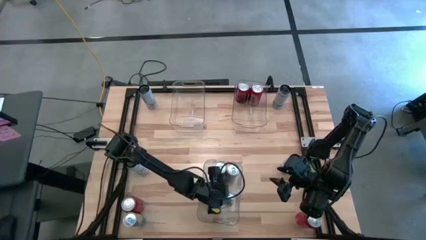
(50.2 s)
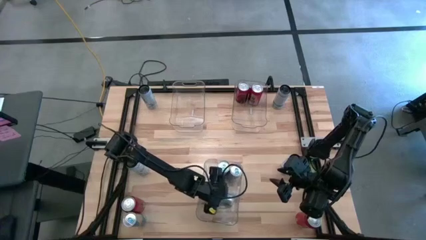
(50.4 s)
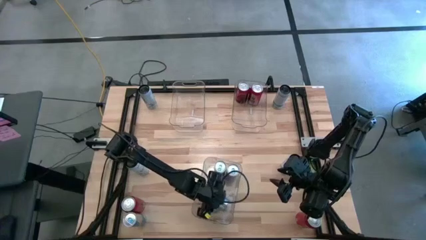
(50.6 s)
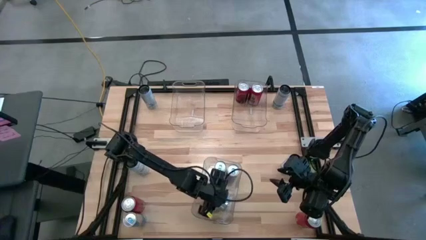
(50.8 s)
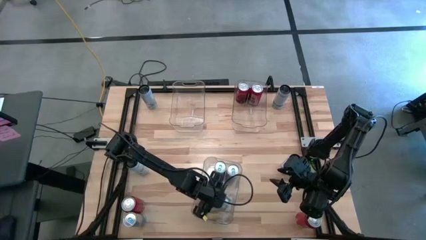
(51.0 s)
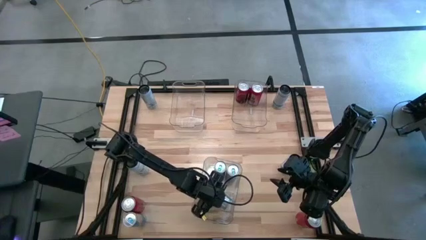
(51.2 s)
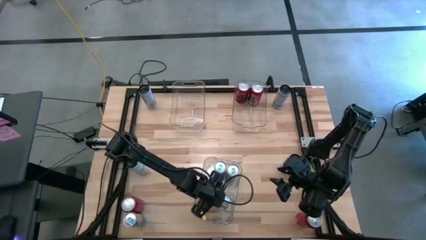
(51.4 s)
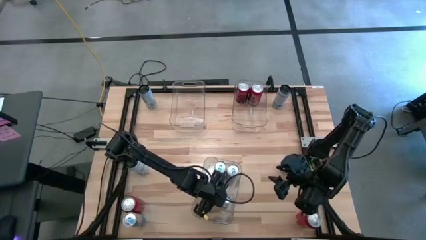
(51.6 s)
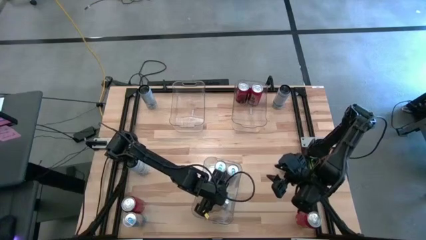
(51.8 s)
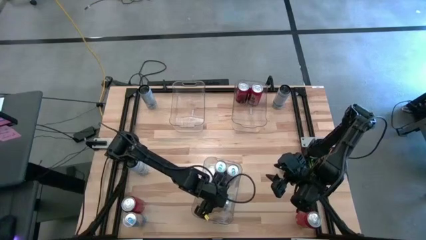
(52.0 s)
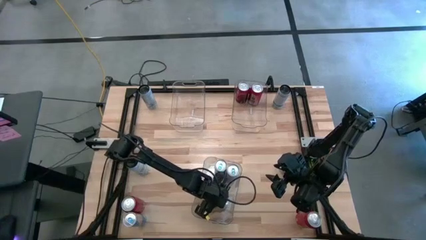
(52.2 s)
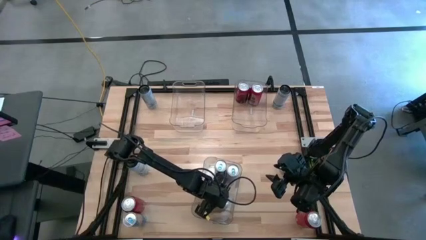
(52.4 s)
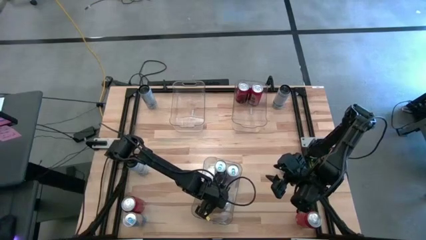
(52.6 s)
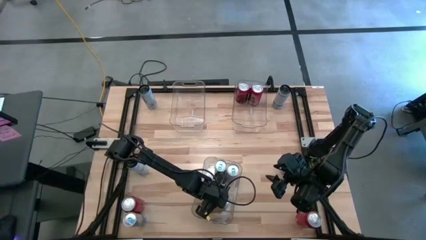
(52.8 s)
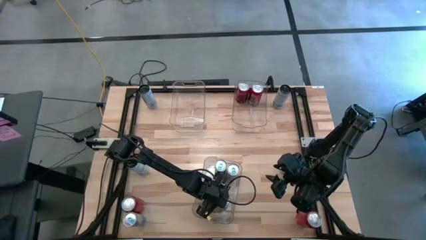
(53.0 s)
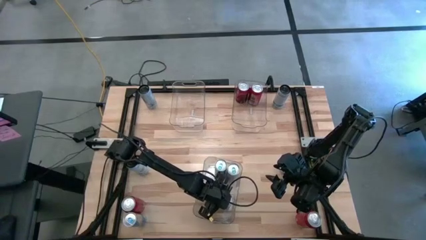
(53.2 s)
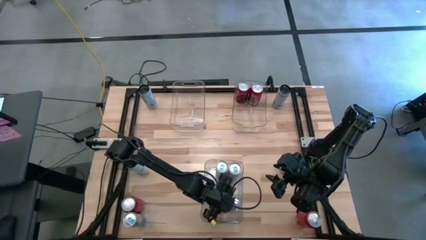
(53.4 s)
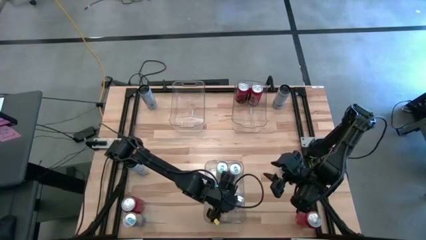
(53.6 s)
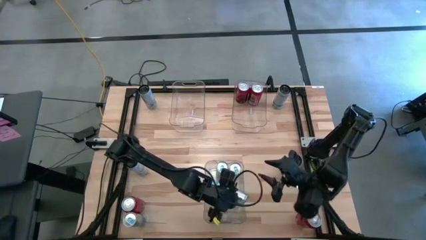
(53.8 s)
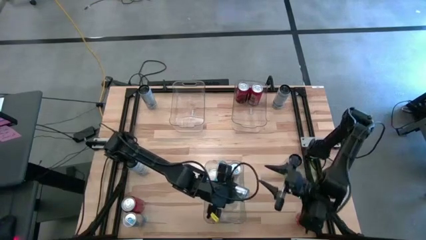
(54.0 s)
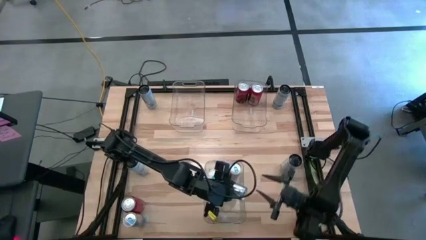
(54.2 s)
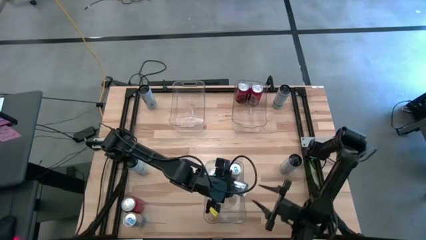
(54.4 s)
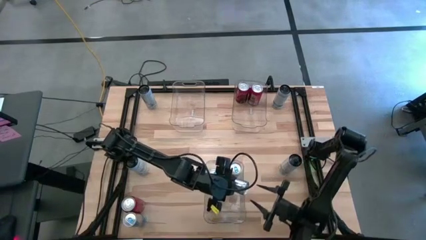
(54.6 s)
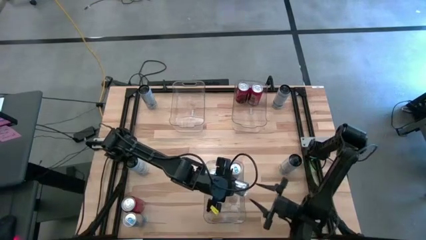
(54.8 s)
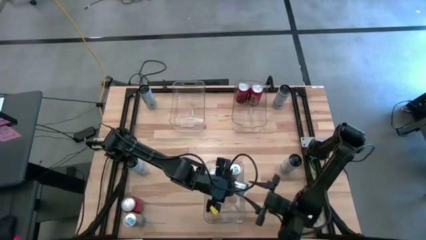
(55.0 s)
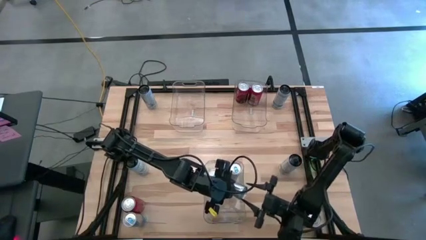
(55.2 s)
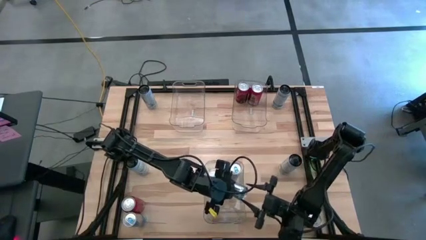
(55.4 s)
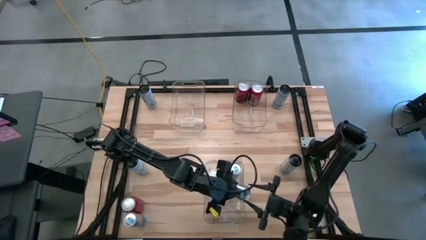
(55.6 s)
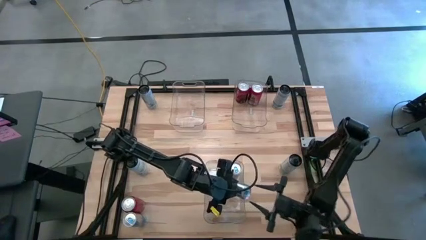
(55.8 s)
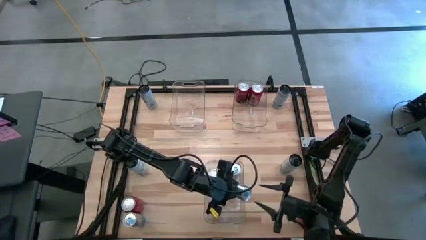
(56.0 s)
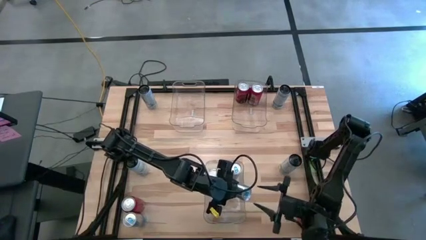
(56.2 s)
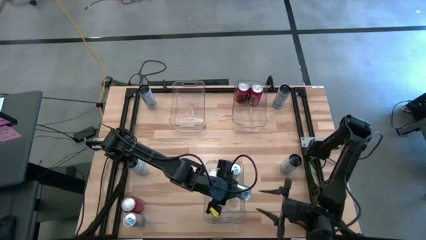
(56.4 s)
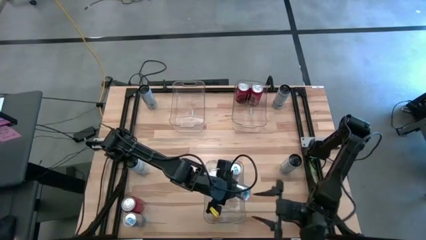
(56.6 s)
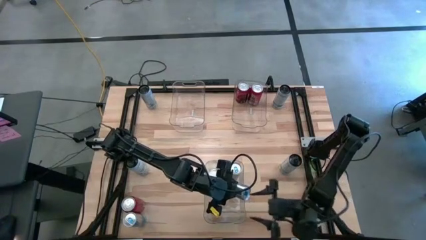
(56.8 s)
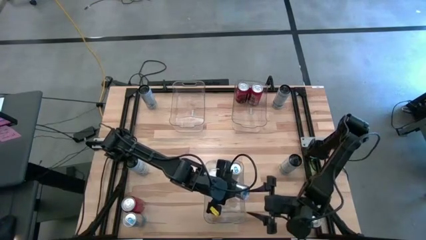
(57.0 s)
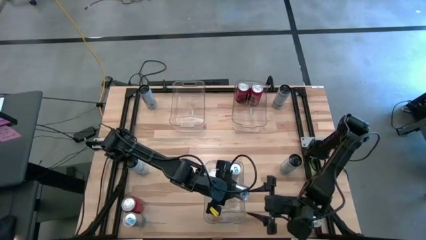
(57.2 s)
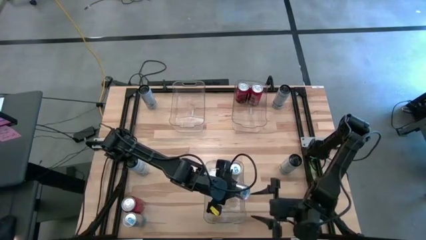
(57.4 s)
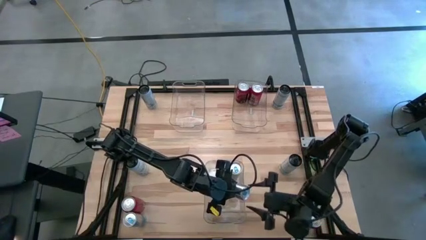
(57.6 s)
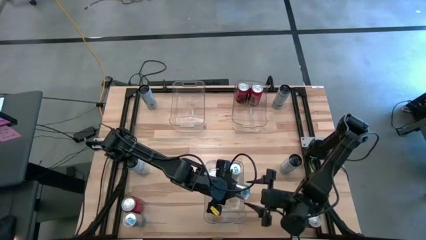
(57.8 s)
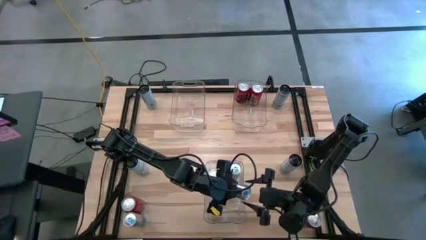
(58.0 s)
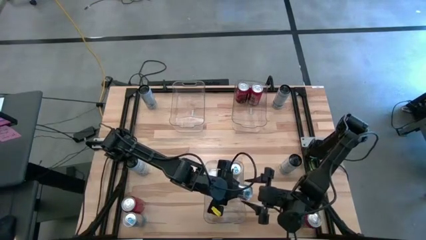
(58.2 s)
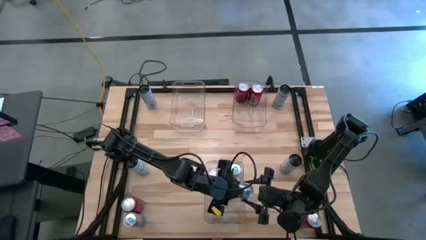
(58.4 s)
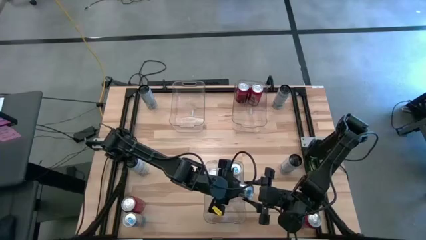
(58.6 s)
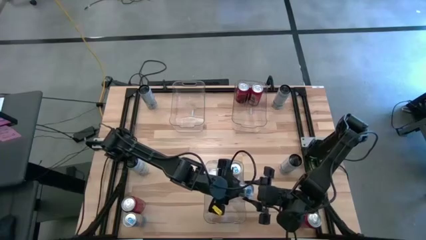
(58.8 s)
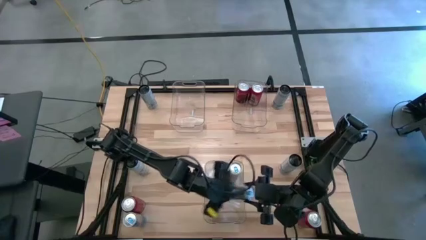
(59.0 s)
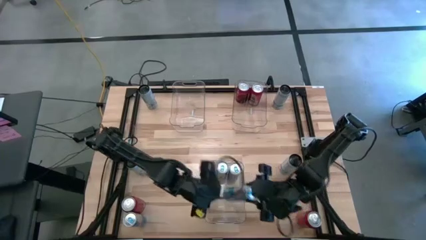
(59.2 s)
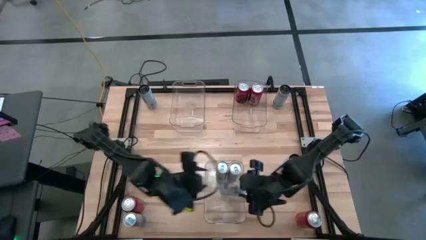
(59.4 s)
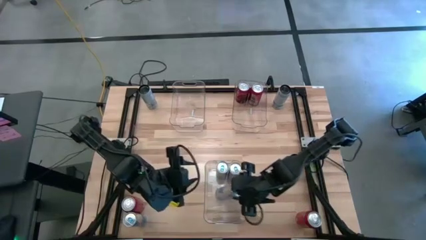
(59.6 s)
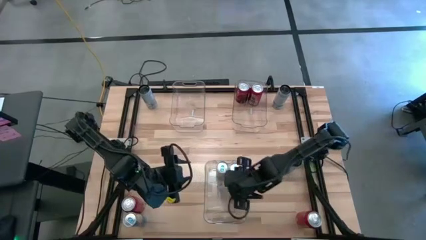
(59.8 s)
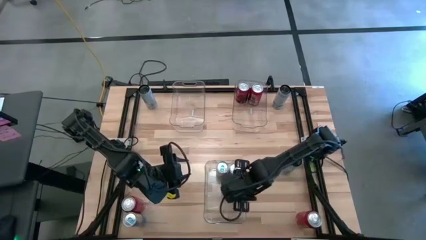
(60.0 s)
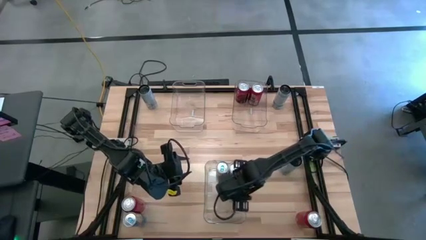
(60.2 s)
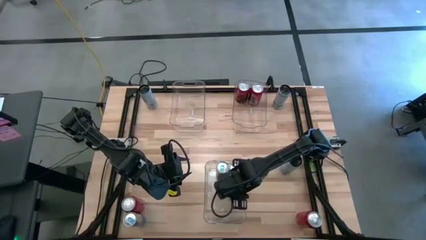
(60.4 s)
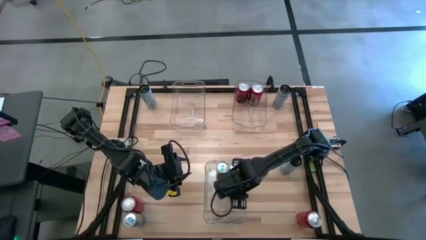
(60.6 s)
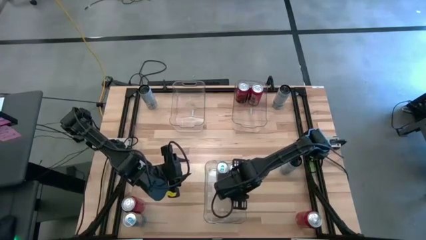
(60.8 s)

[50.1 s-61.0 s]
Task: Sort soda cans
Put the top blue soda can into the bottom transparent bin

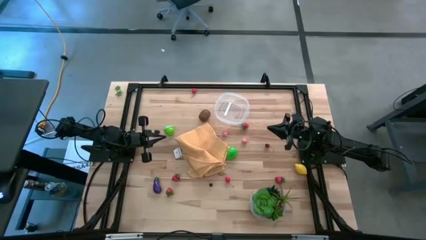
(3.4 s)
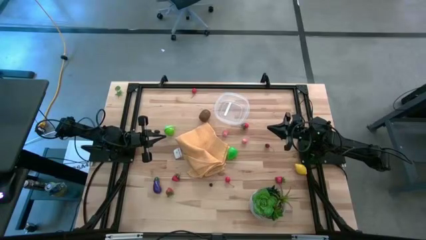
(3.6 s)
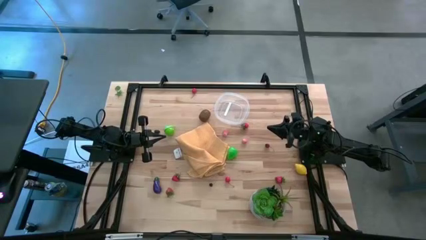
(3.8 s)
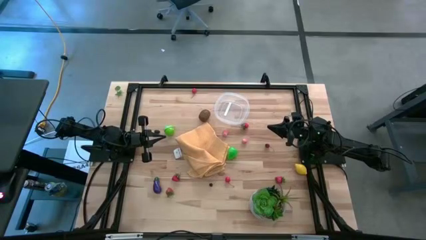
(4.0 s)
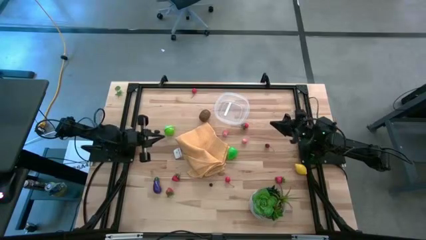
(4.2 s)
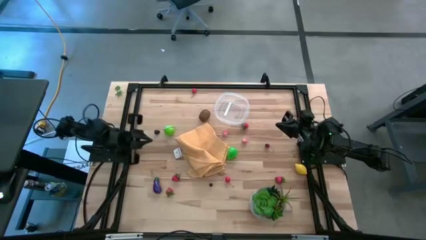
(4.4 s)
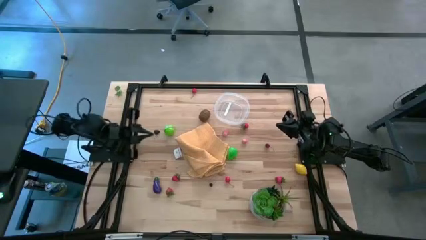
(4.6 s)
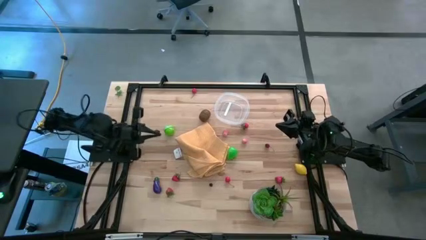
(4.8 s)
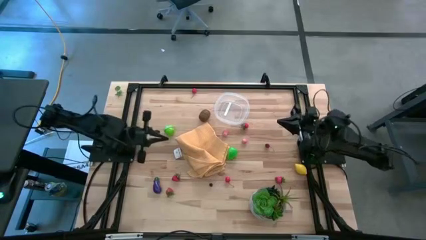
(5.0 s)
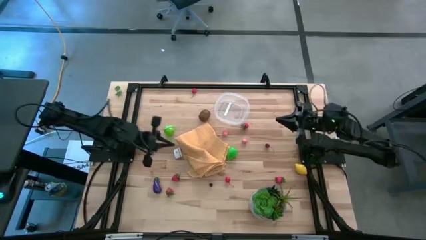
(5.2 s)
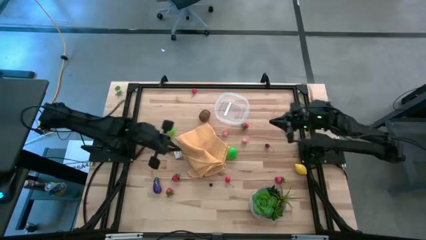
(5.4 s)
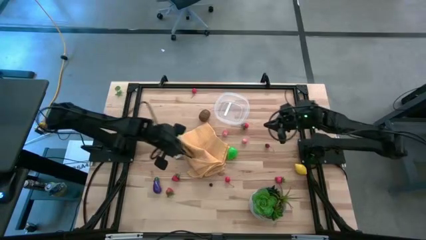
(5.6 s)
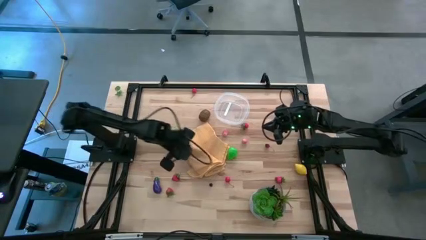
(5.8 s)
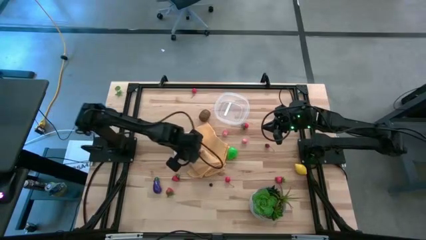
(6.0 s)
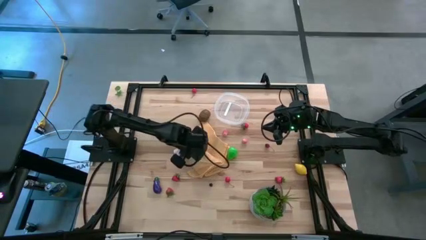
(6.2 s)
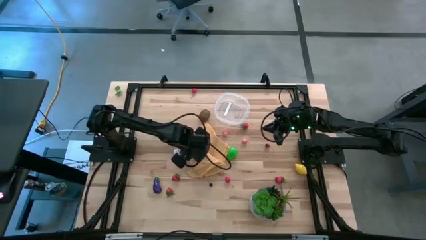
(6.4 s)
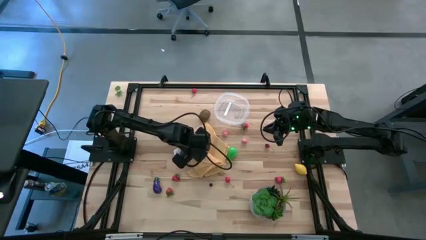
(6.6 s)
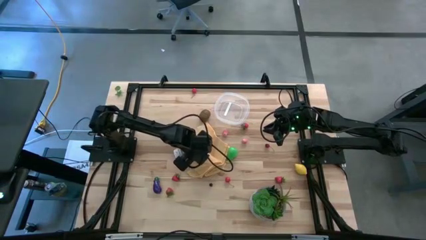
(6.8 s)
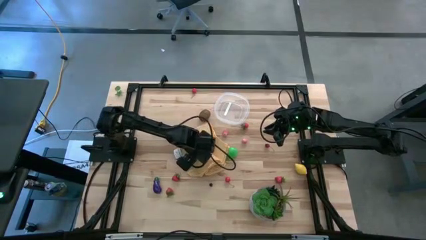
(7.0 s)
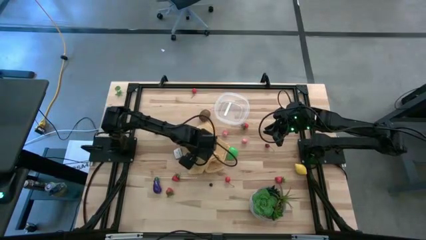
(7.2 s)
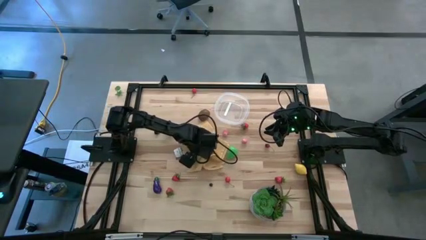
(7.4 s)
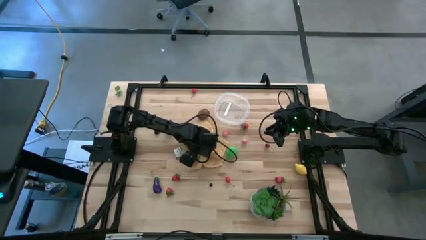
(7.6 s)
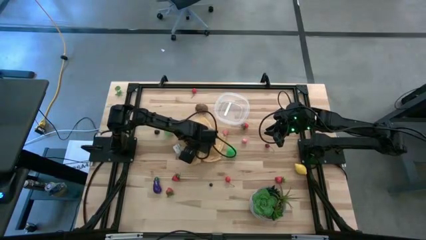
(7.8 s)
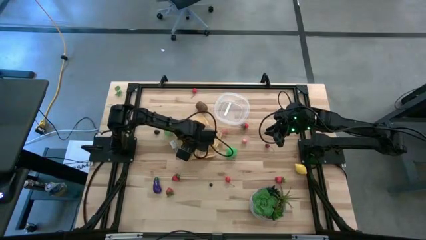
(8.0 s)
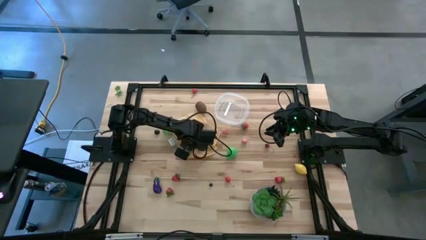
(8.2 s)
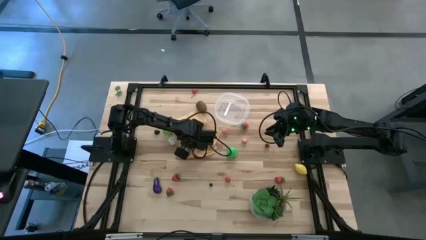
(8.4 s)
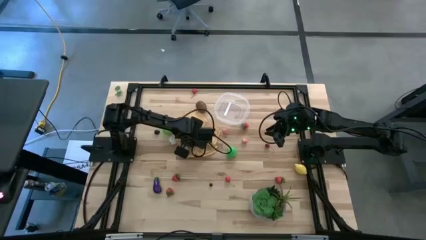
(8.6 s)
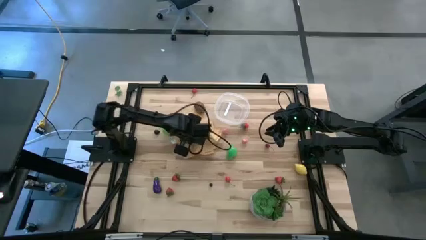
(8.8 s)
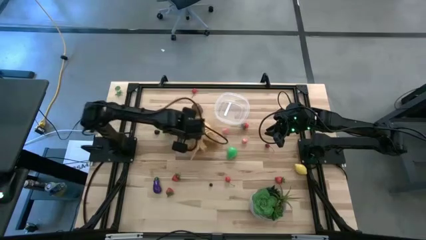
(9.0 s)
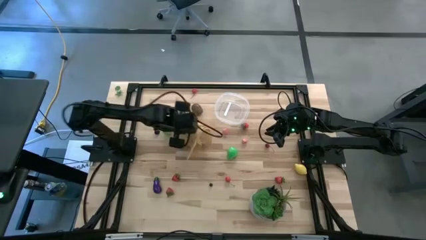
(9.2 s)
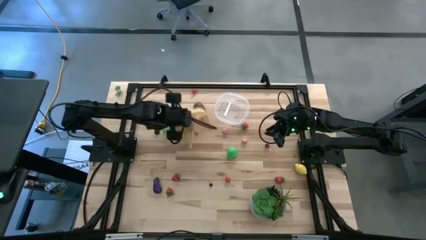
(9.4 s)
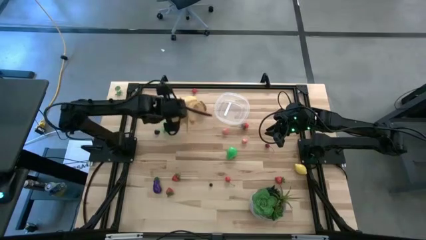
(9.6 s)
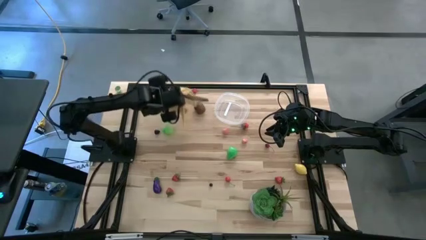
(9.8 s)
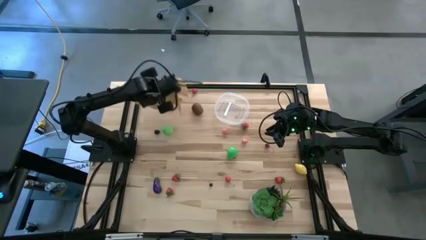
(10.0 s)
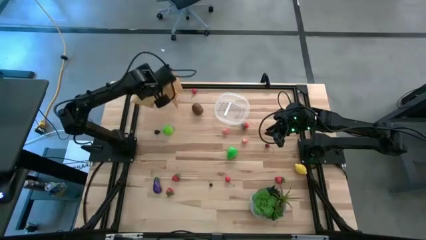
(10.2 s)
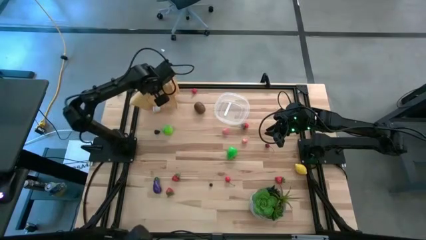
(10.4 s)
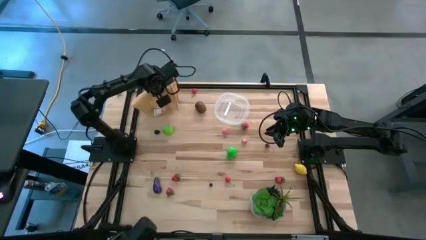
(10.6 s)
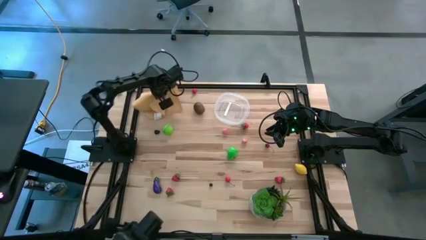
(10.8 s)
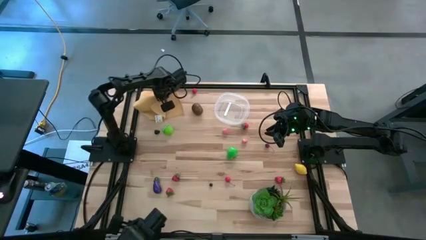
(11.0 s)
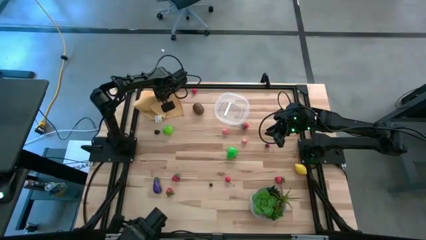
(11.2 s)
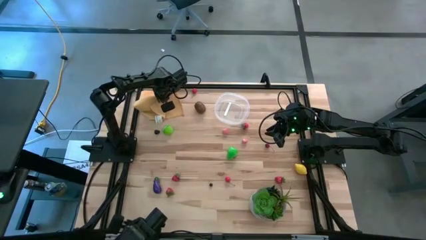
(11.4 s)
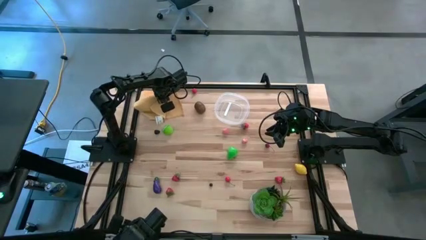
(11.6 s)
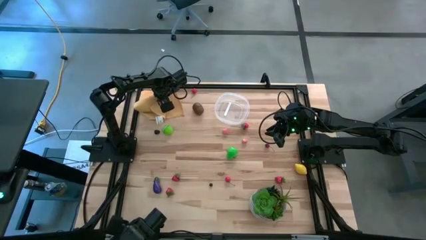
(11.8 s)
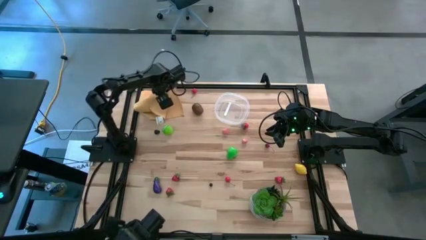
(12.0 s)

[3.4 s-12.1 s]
Task: Pick and placing Produce into tupperware
Move the yellow towel to the top left of the table
